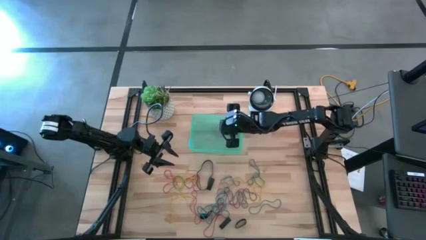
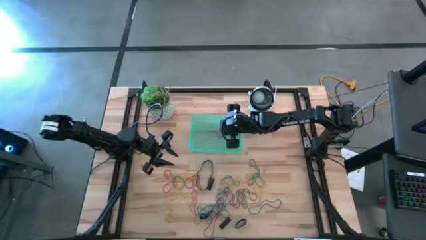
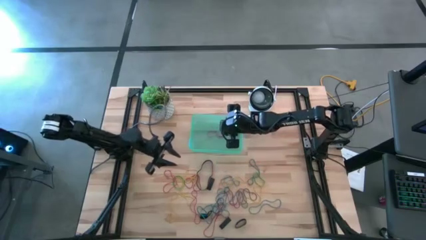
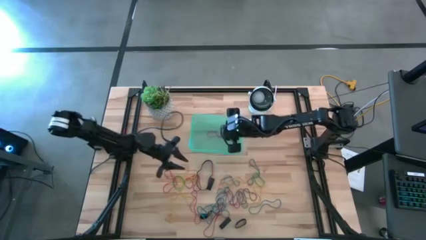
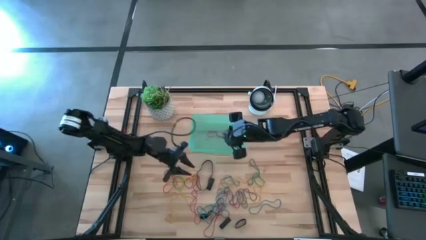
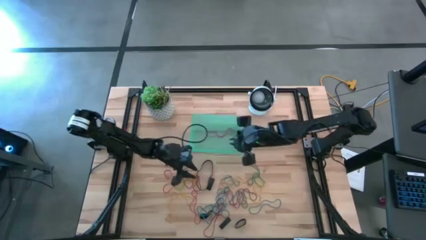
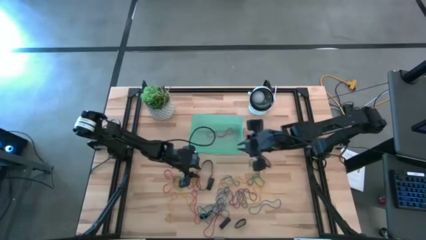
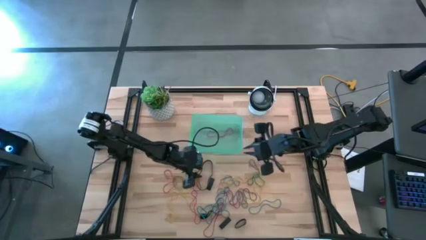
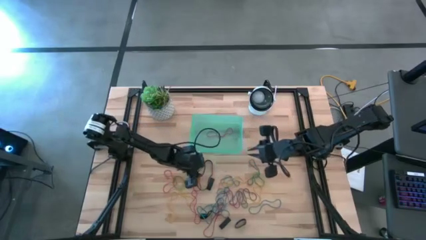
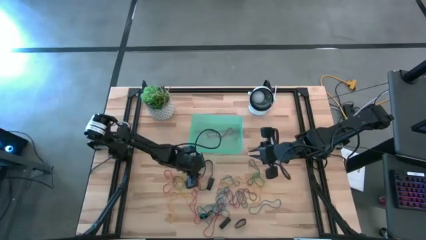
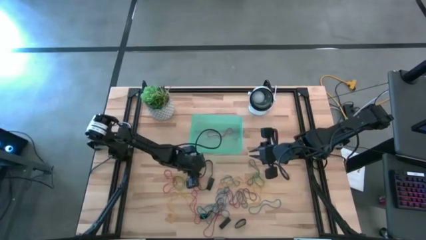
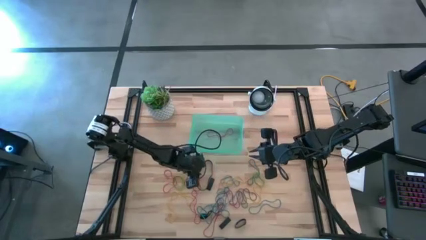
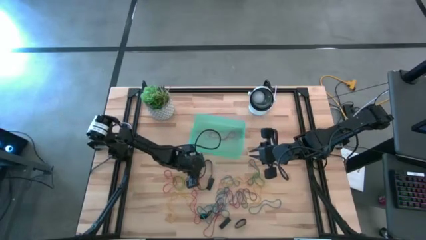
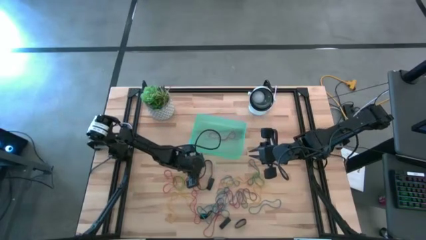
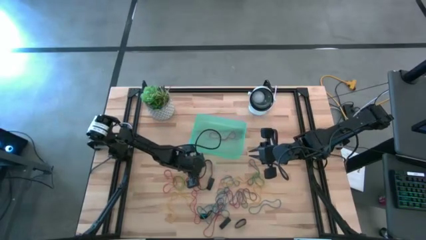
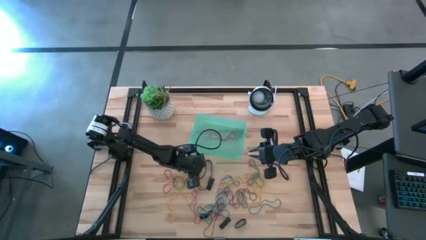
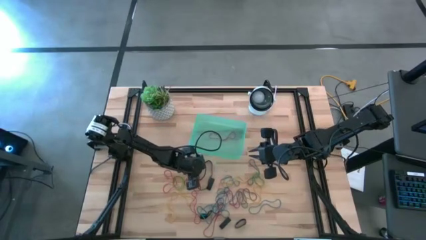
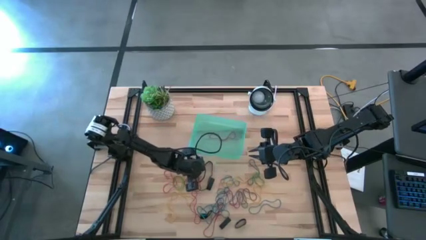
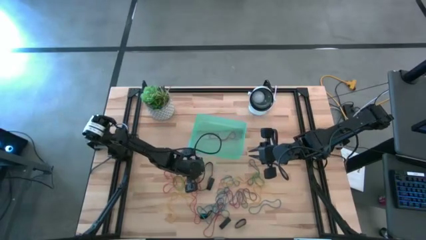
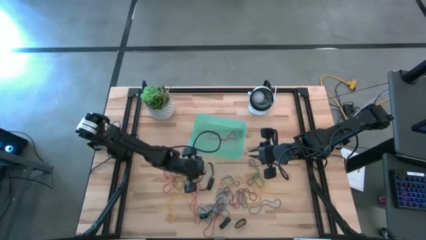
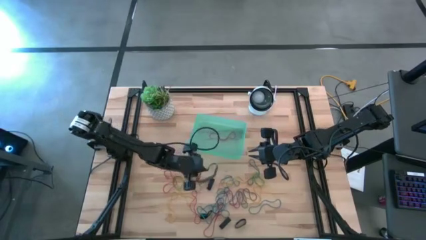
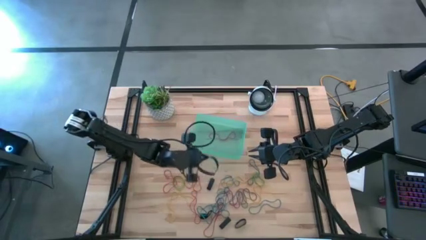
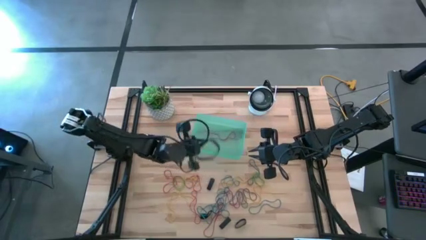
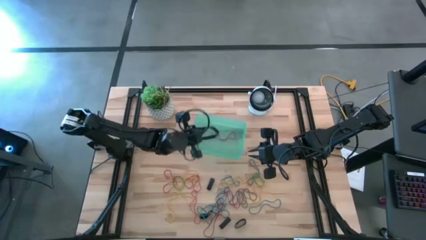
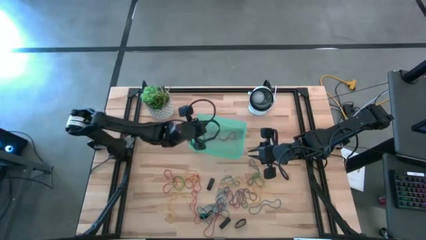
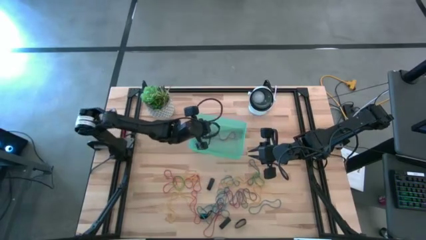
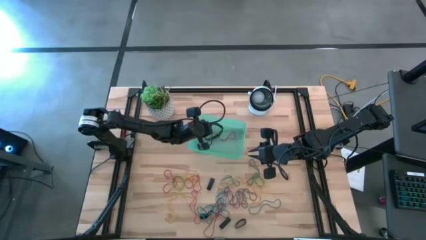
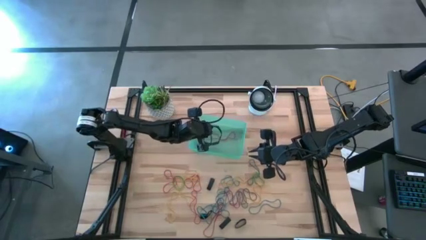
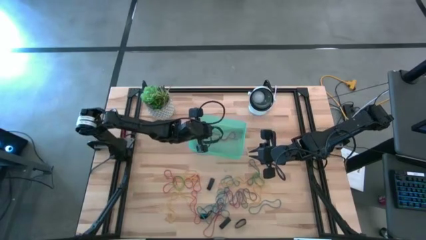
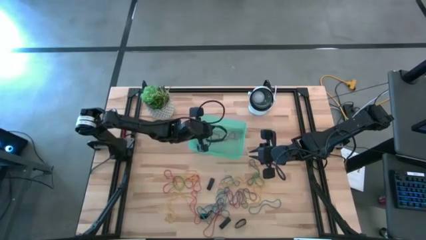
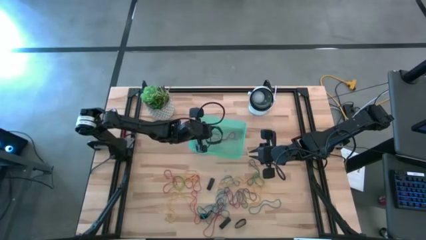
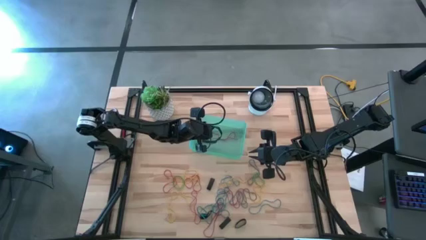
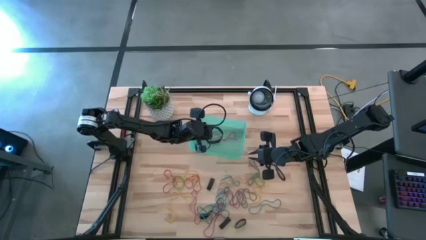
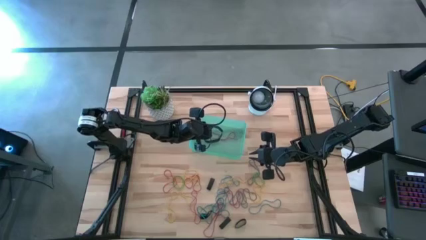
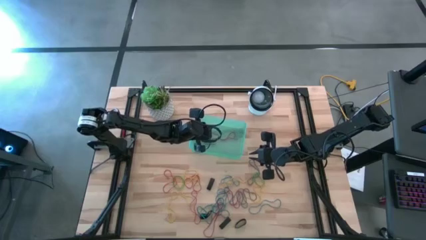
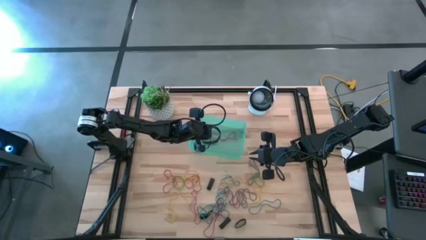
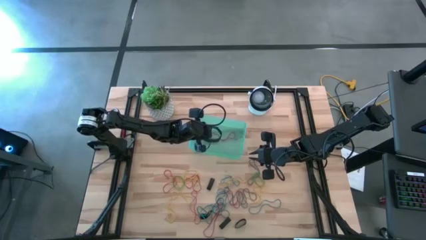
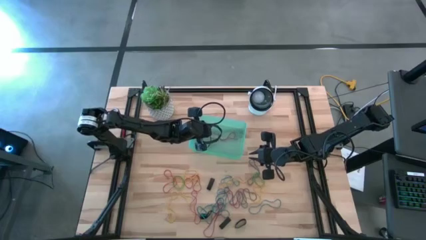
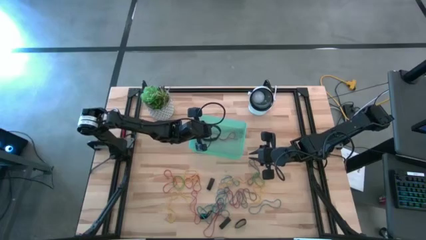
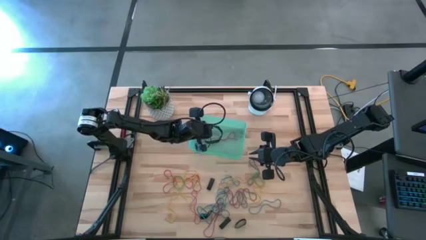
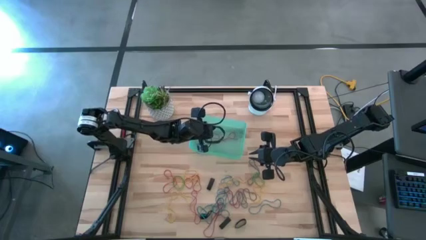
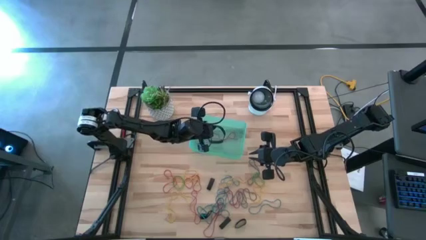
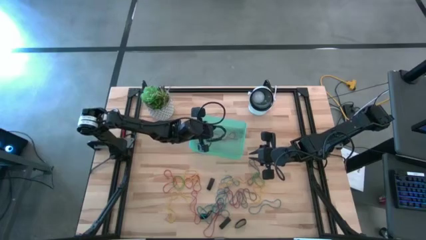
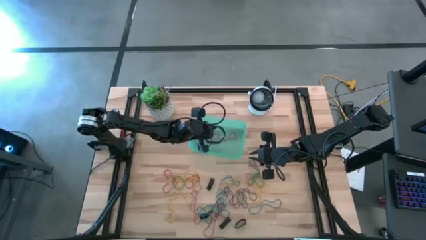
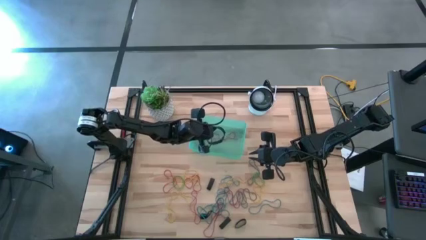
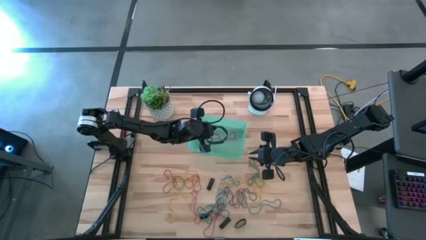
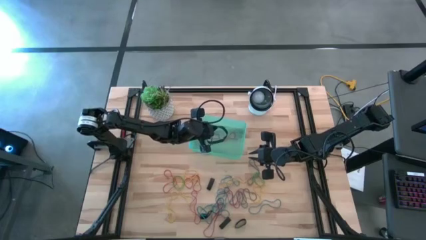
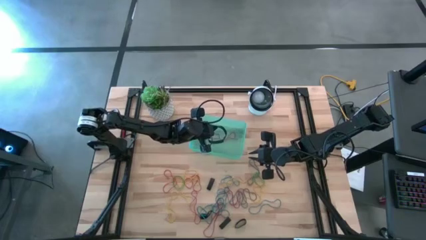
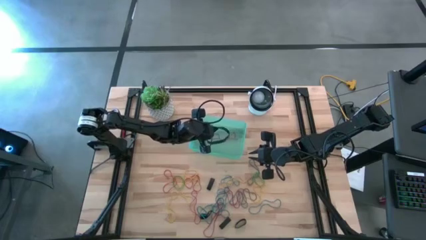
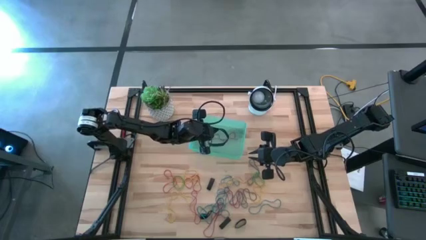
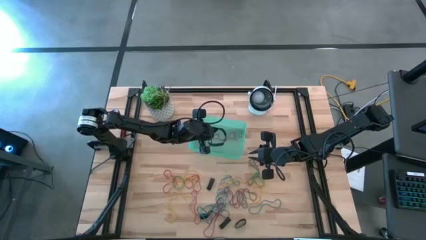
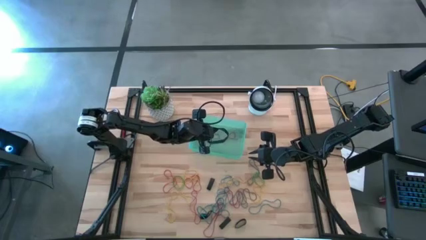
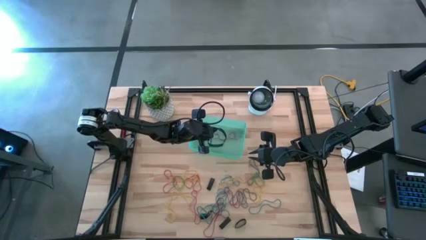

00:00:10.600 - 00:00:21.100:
Task: Pick and place rubber bands into bin
Put the black rubber band into the green bin

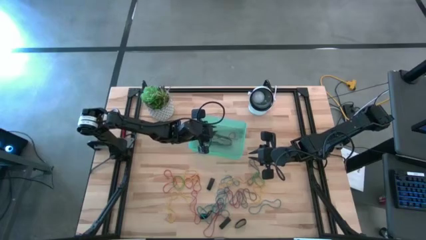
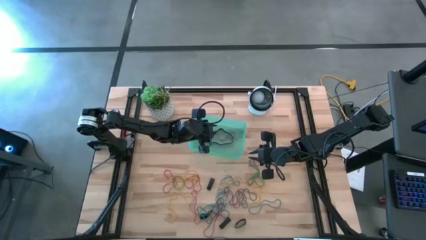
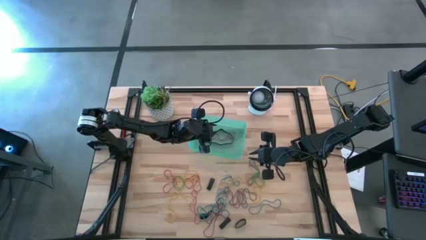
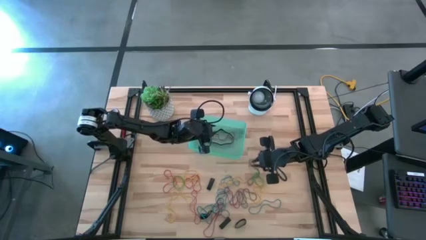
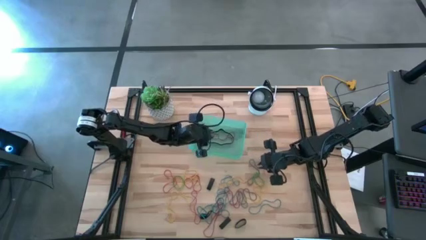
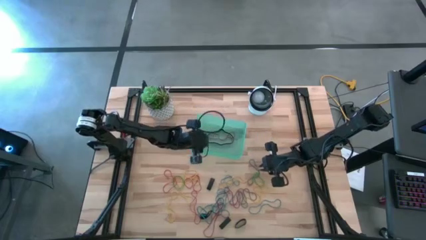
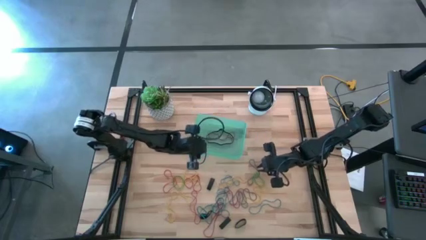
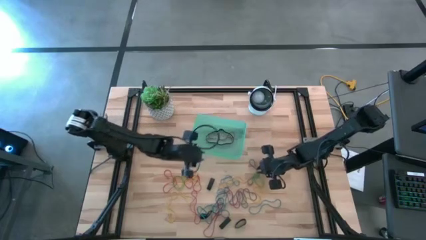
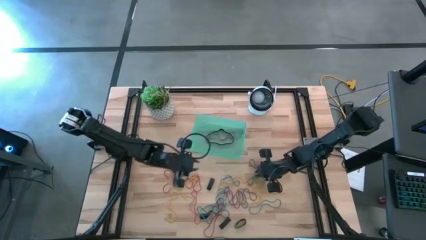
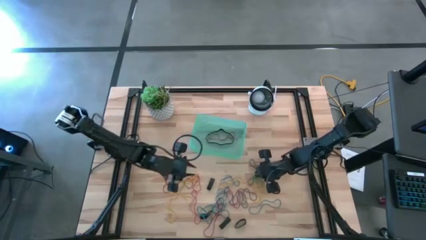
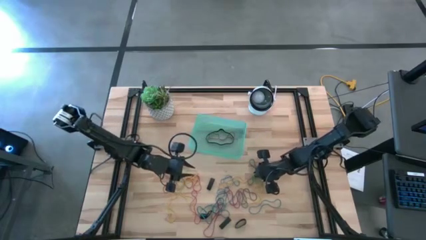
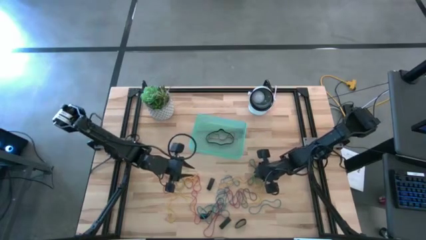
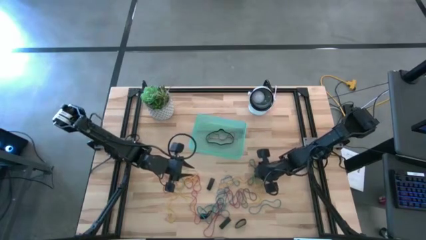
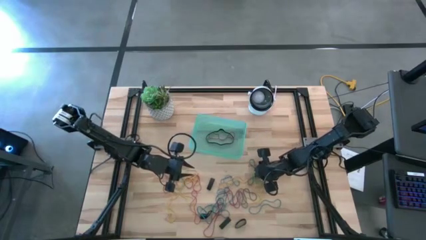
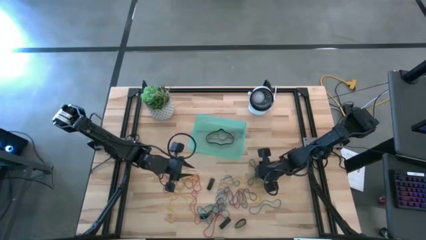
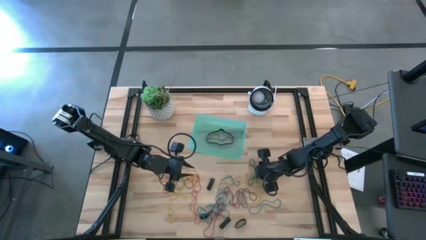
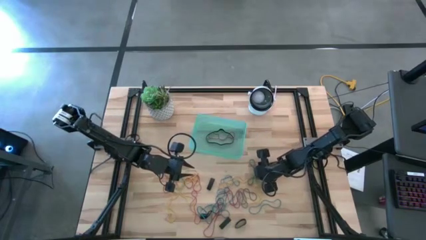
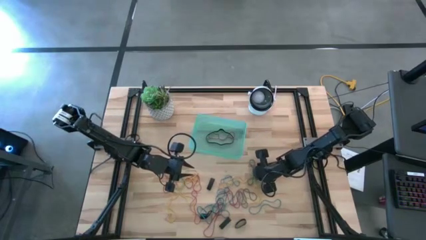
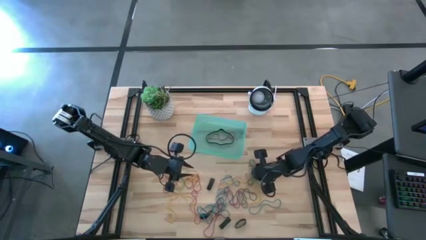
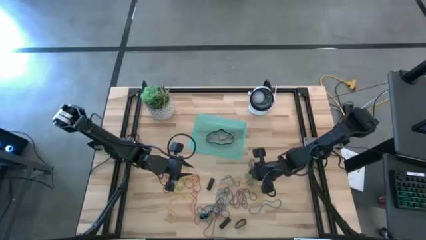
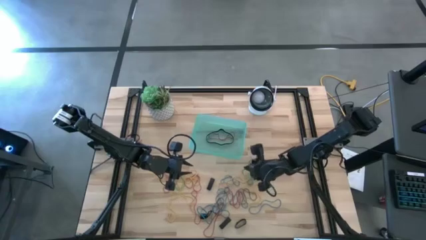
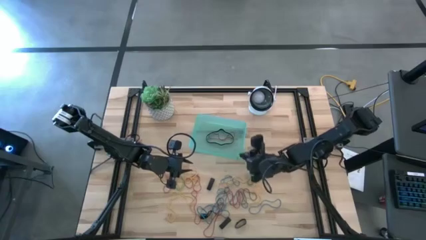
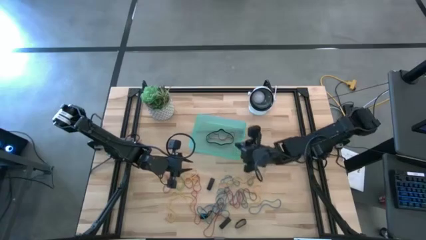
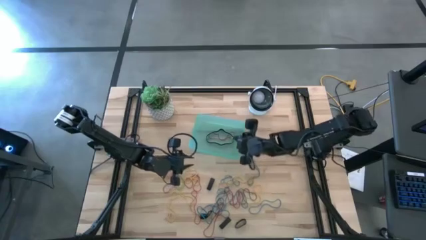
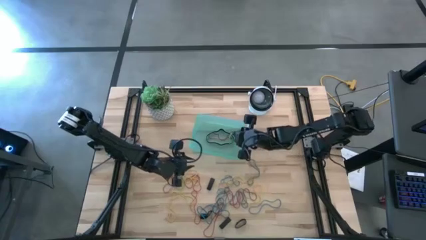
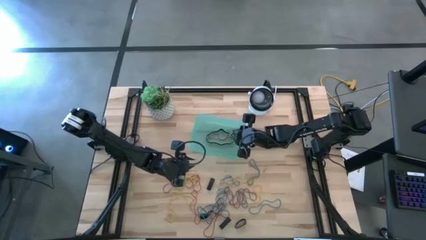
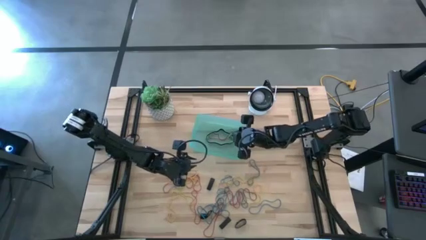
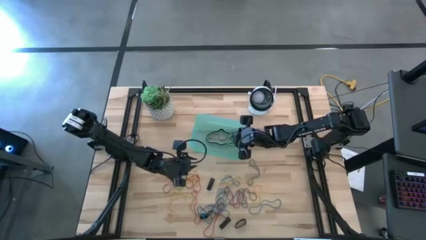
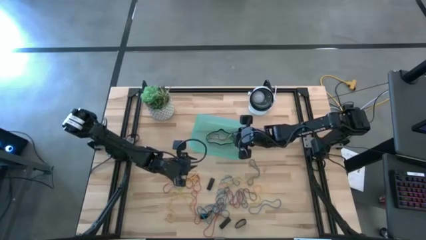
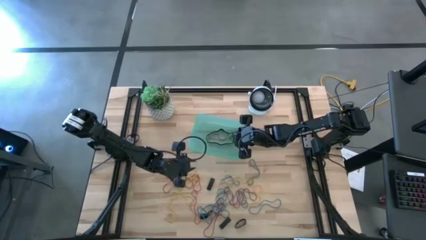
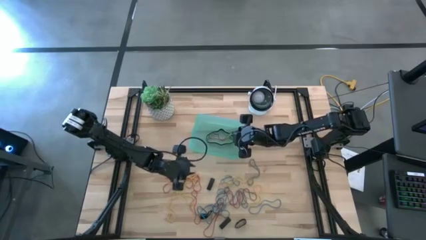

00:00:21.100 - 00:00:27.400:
Put the green rubber band into the green bin
